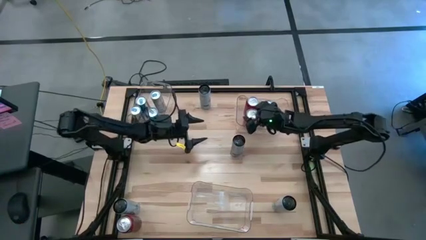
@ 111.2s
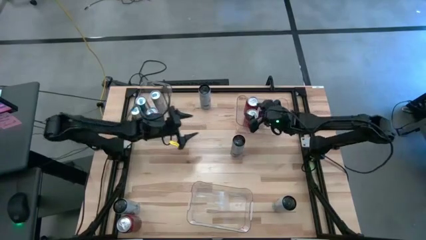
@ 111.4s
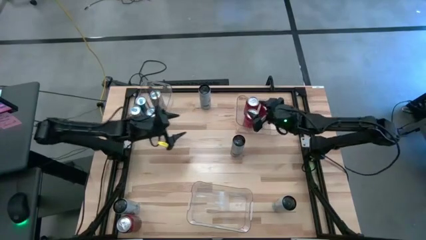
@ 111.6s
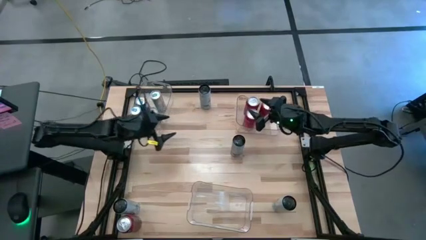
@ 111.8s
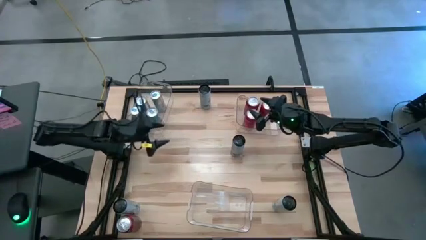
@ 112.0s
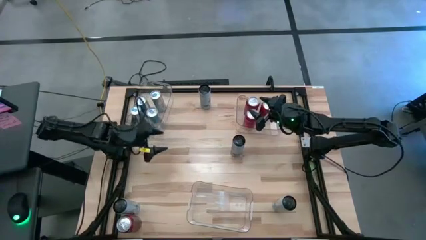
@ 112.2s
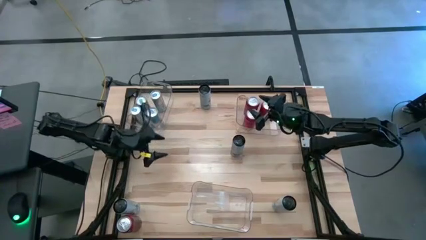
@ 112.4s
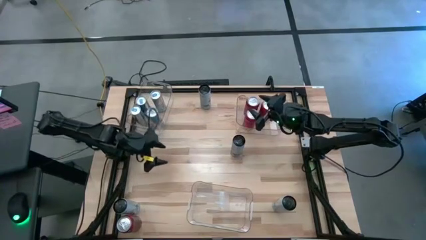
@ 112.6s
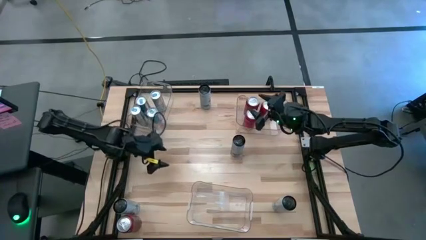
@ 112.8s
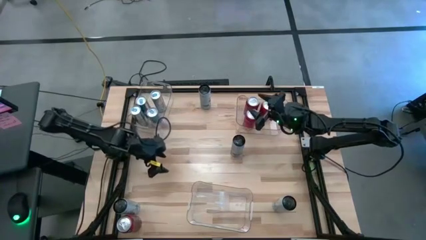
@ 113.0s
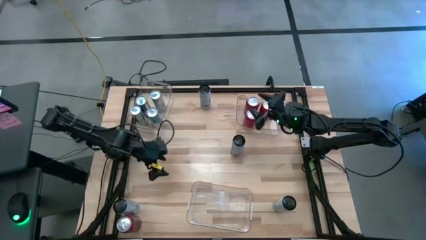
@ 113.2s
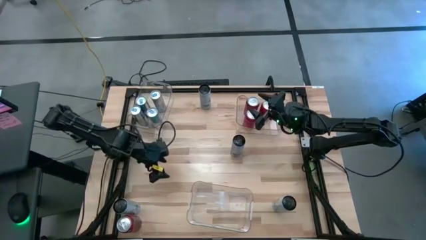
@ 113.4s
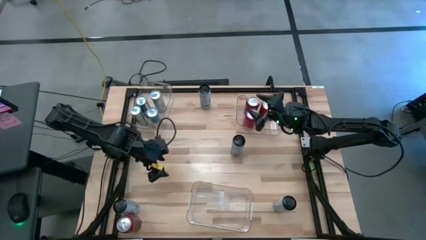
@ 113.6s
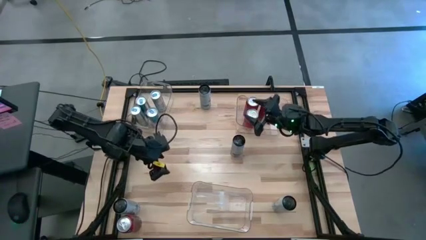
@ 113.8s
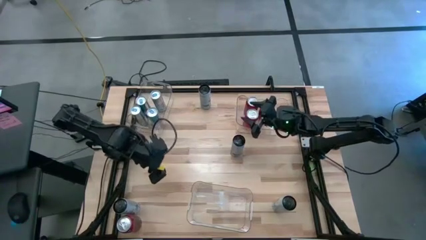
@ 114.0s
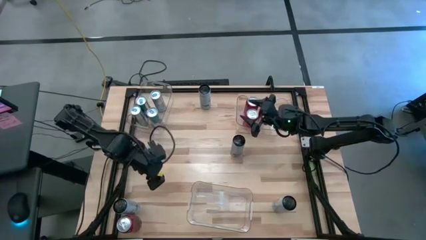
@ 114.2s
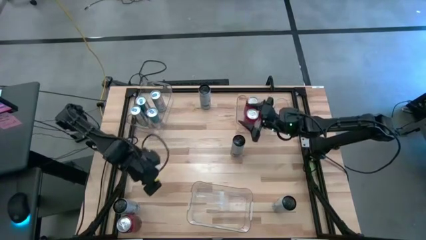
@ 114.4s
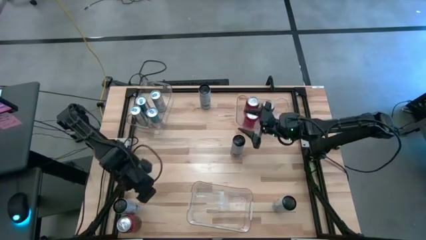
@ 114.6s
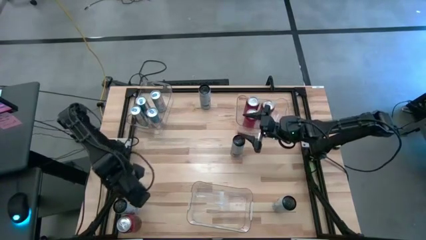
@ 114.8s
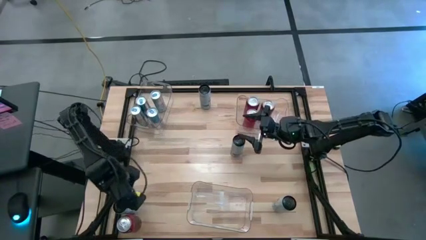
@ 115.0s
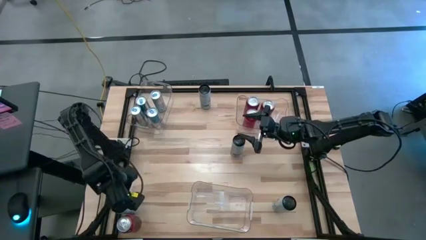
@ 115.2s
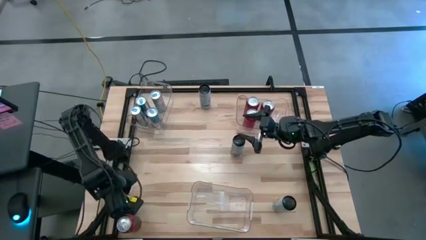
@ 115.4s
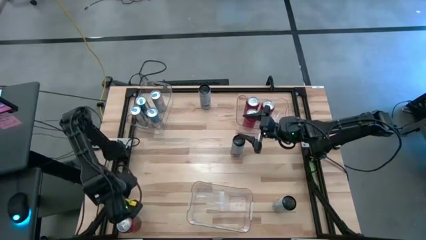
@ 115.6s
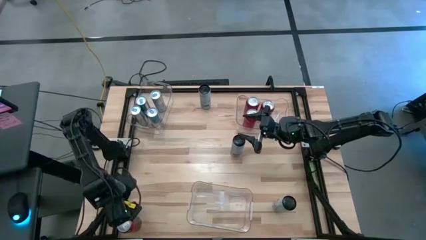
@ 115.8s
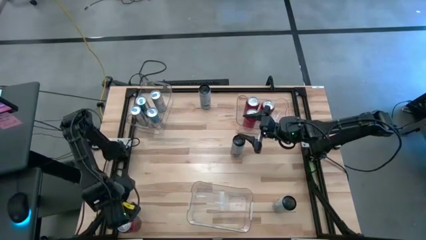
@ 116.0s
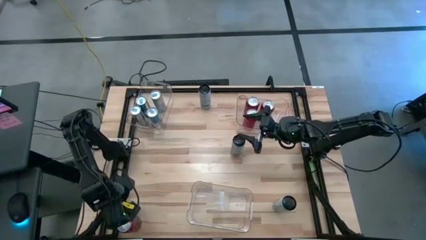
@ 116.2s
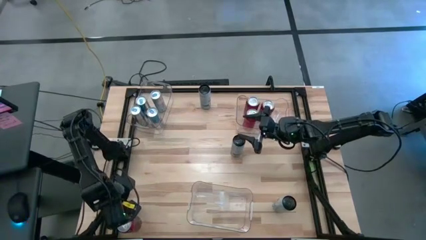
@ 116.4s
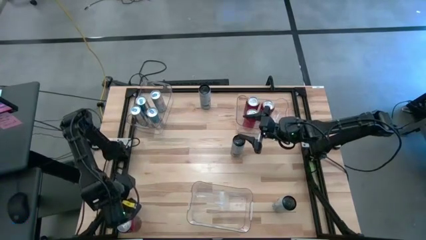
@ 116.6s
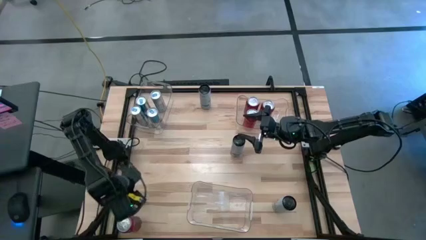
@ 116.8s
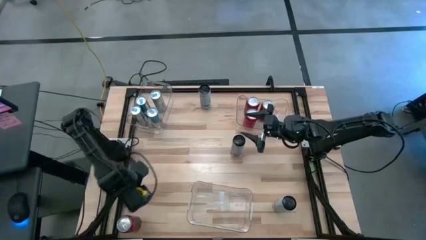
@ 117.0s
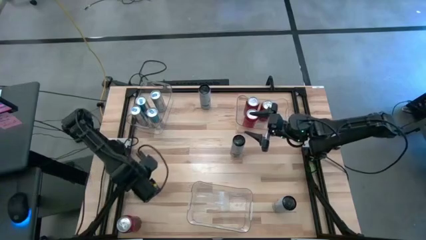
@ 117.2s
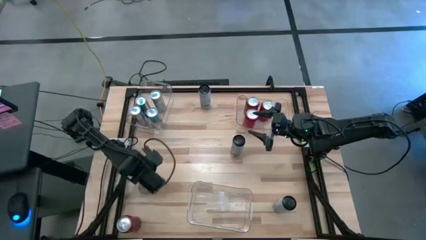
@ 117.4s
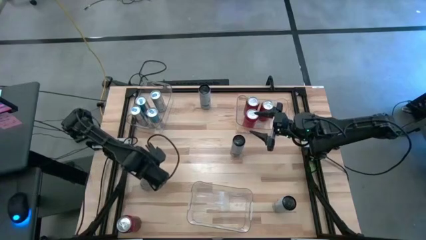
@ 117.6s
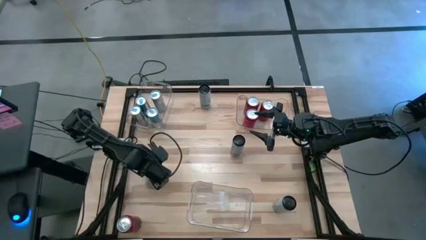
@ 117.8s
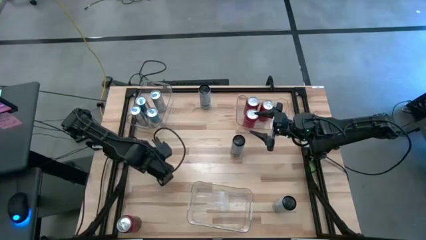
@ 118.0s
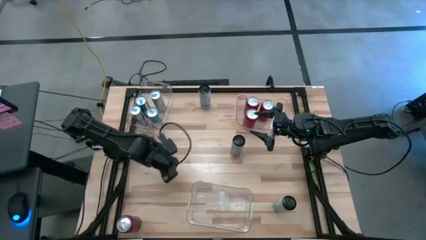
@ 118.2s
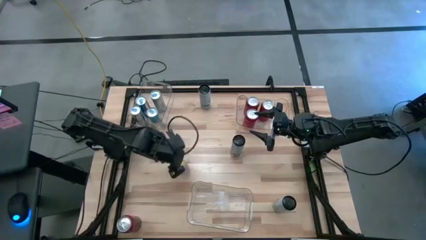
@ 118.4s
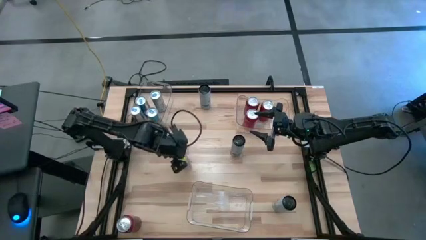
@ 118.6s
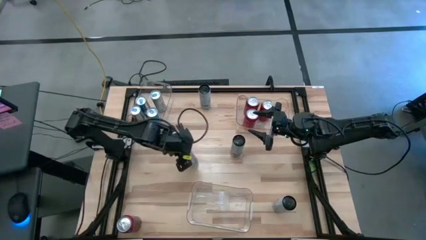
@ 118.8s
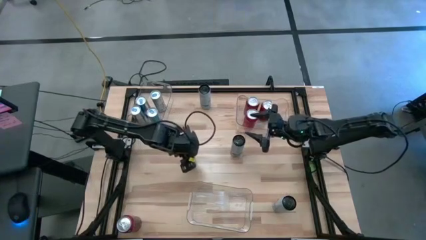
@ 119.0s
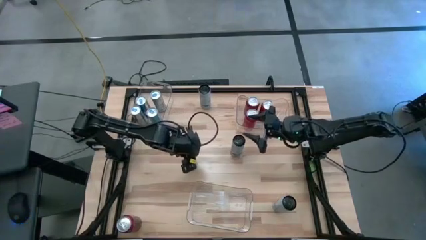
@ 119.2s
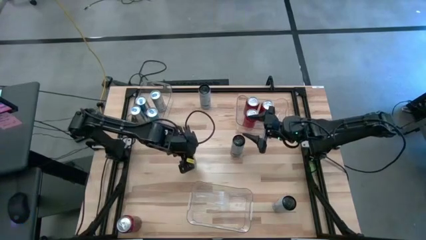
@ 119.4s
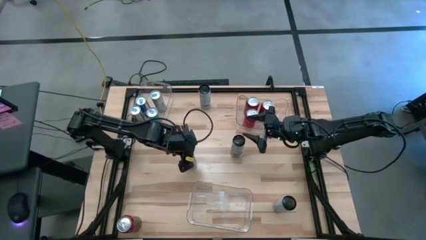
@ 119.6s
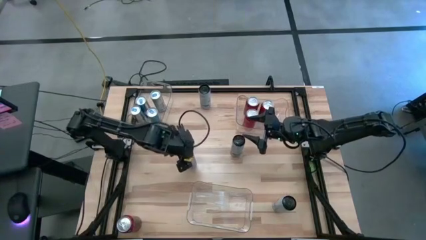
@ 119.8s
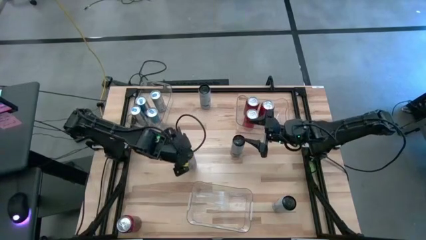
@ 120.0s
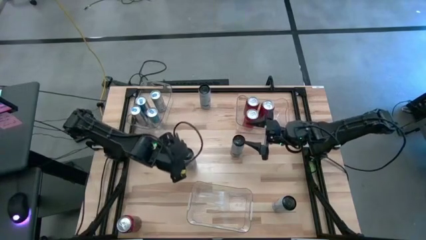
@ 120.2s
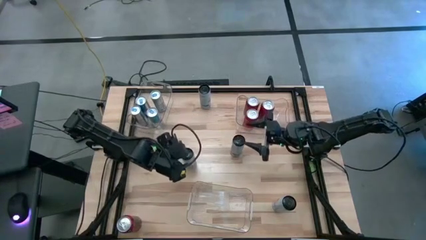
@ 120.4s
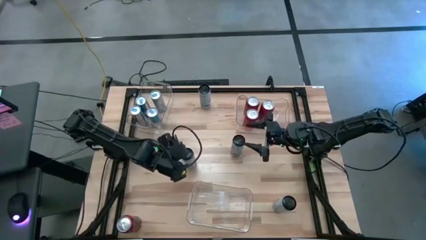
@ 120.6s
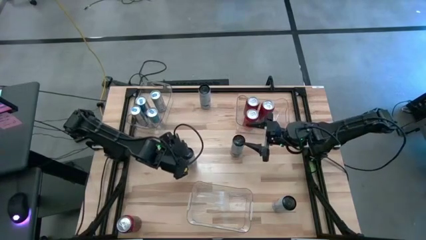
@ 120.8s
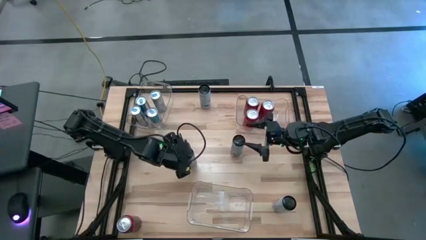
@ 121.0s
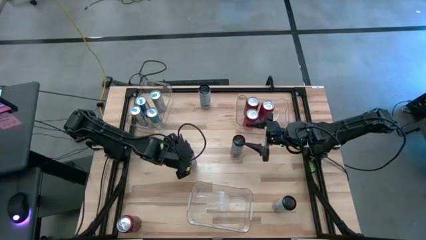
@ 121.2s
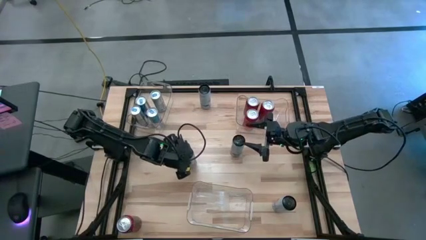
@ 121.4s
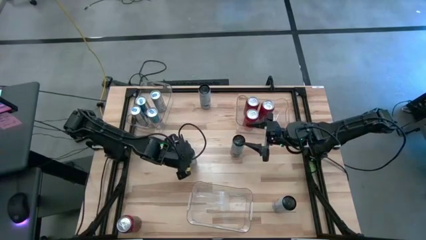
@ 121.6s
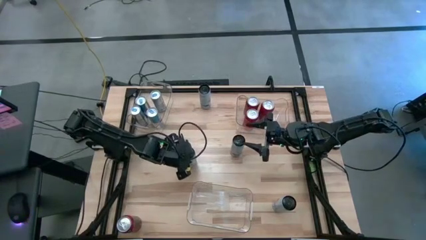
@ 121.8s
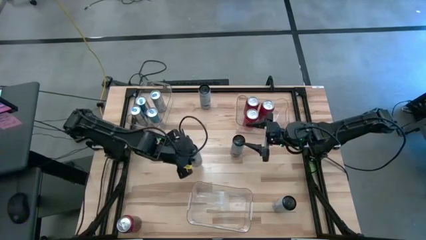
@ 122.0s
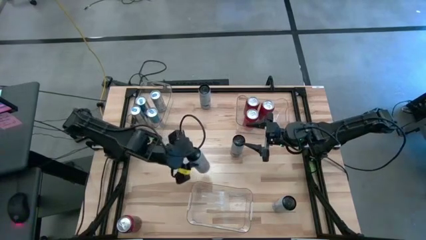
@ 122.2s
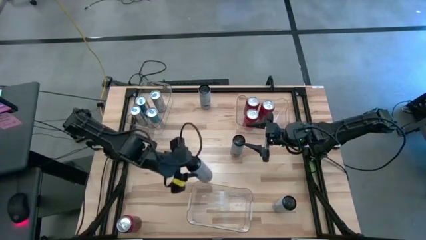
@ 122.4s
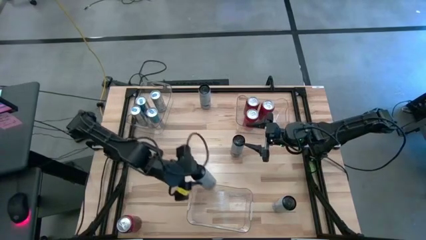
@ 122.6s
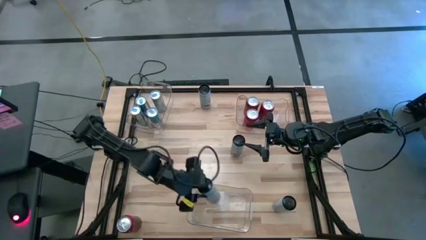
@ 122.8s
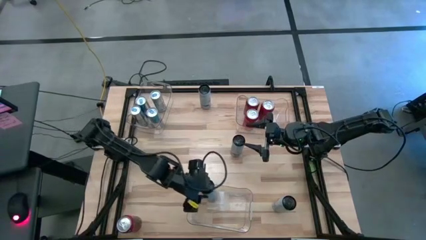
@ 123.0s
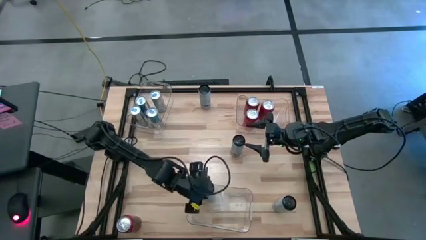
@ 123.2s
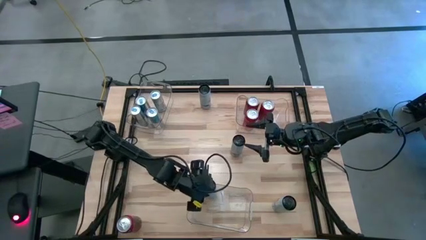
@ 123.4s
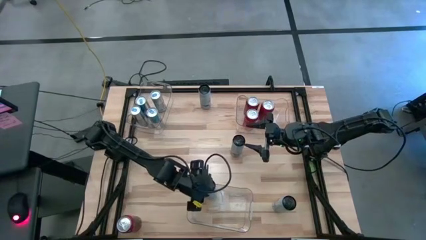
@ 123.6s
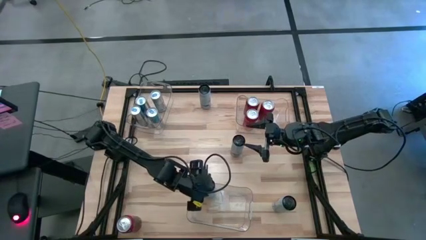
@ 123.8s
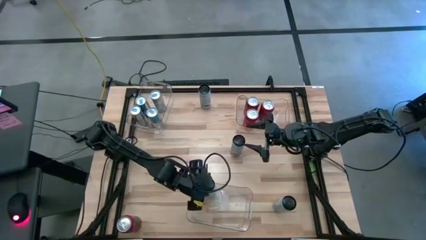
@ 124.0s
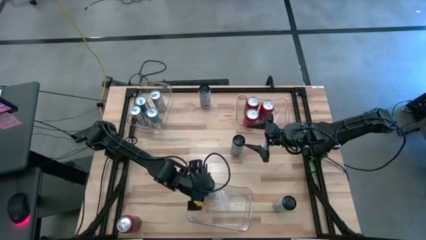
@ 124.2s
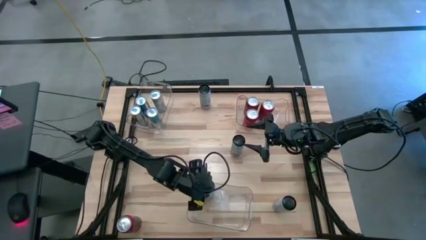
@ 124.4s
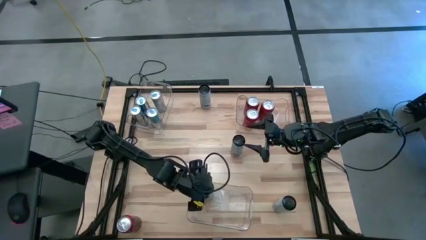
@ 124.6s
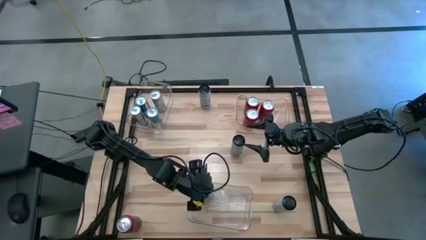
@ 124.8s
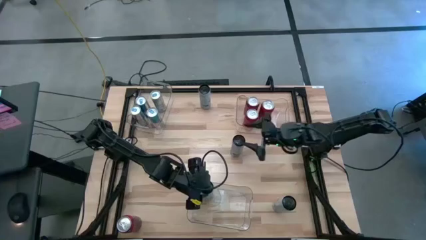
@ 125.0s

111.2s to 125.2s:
Task: Sort soda cans
Put the white blue soda can into the bottom transparent bin

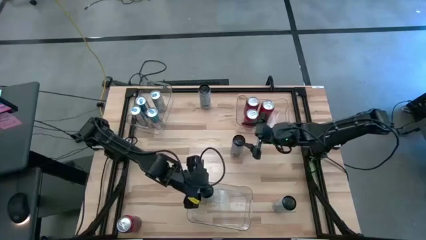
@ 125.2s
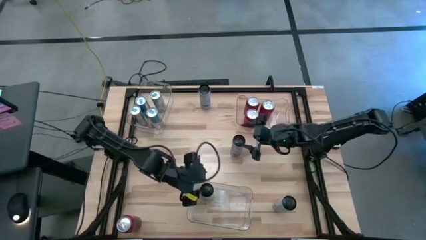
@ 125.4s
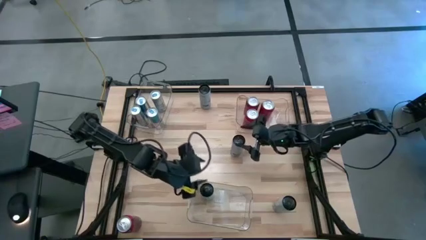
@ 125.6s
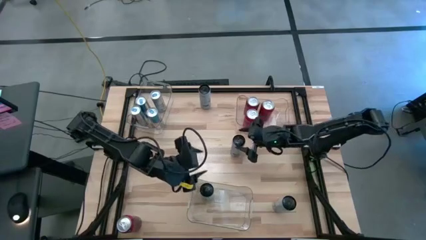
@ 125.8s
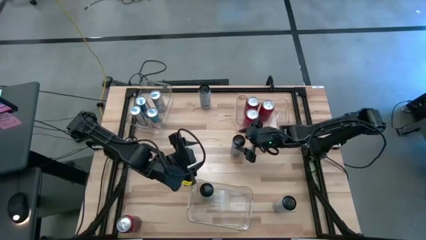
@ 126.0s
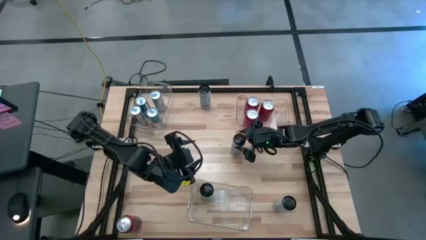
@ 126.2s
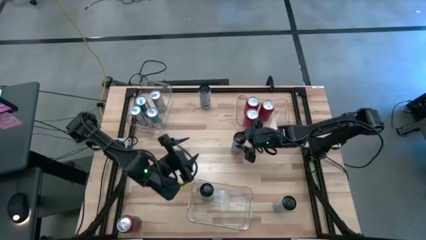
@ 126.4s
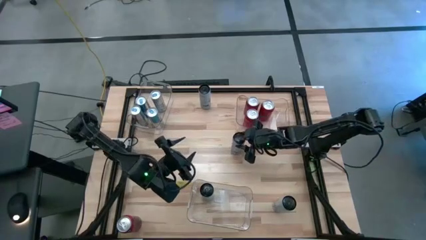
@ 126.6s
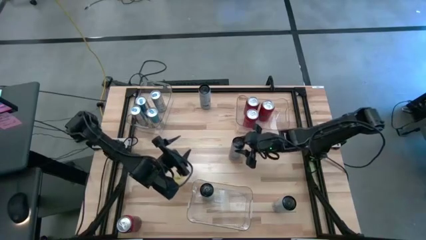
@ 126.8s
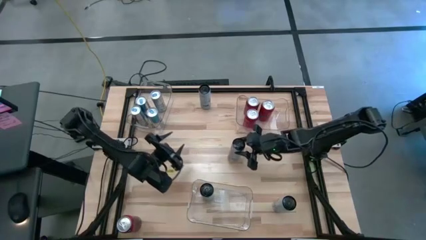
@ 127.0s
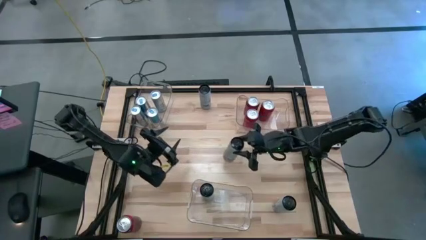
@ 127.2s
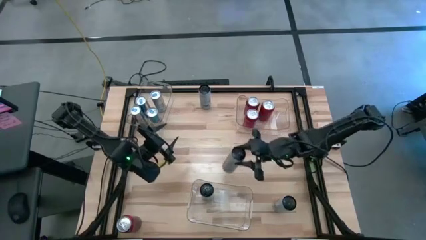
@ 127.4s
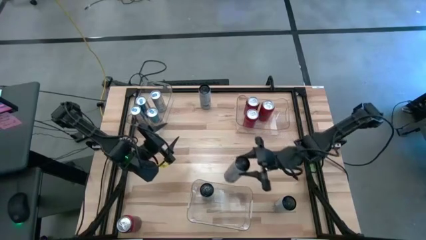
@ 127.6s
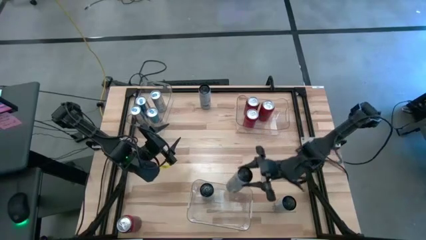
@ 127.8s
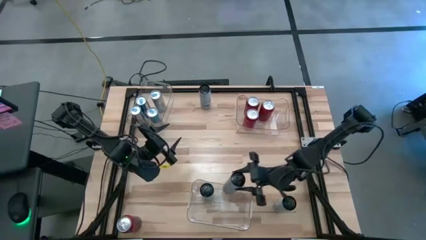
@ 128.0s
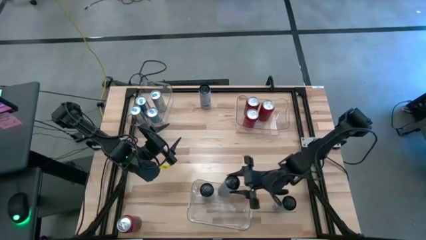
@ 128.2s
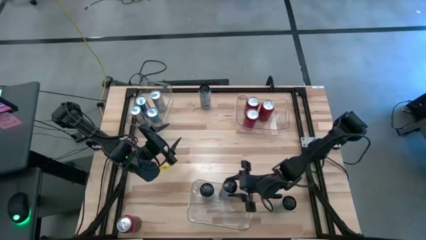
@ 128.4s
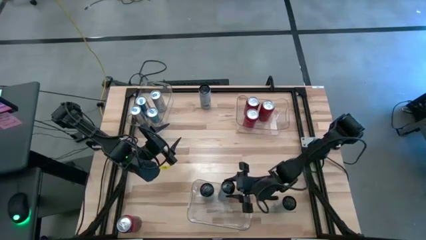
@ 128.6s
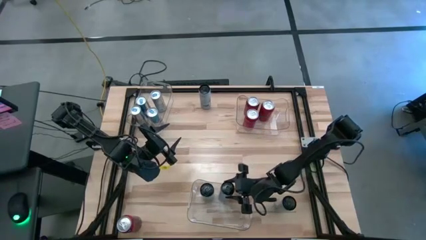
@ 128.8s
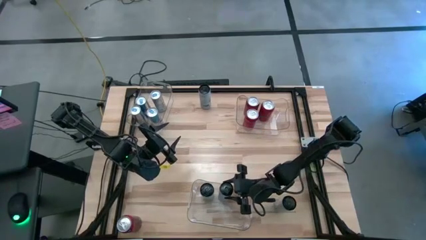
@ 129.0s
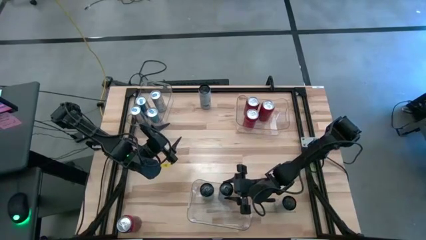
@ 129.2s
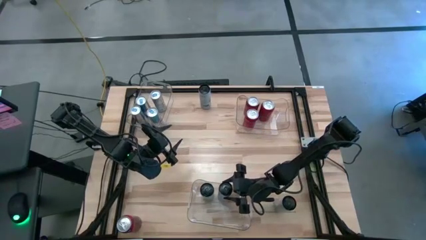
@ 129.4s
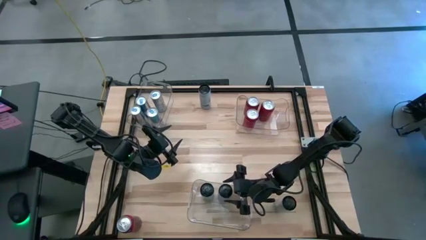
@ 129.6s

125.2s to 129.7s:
Put the white blue soda can into the bottom transparent bin
